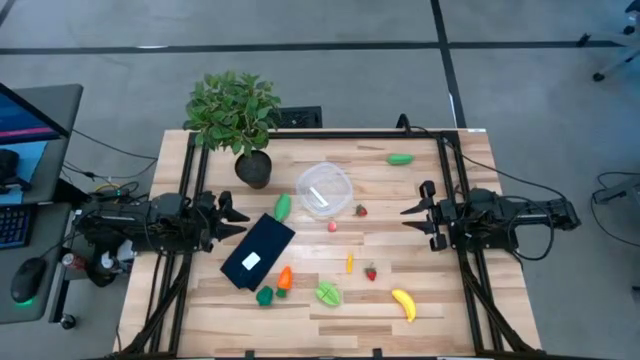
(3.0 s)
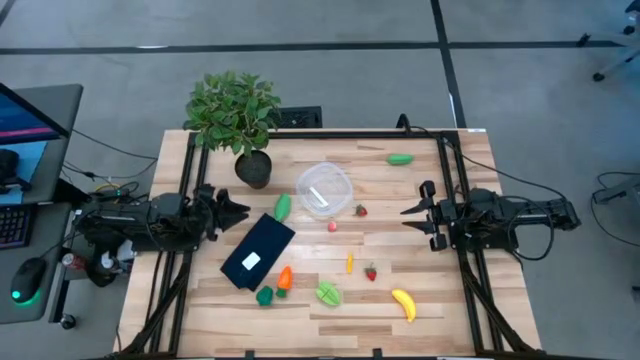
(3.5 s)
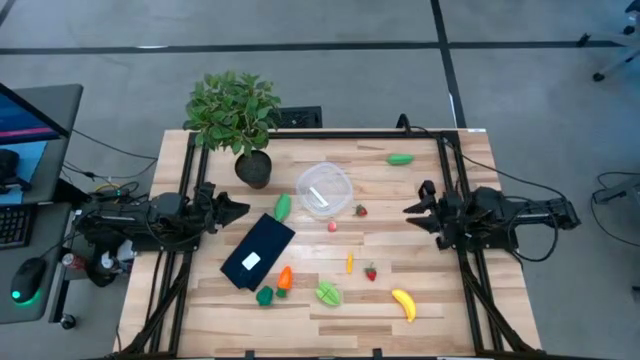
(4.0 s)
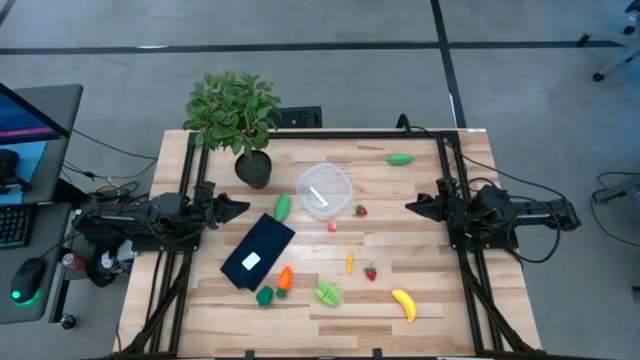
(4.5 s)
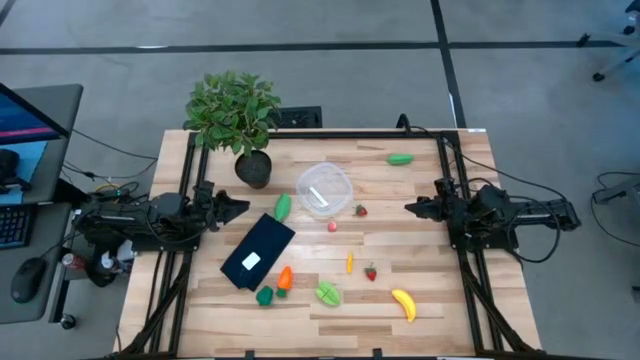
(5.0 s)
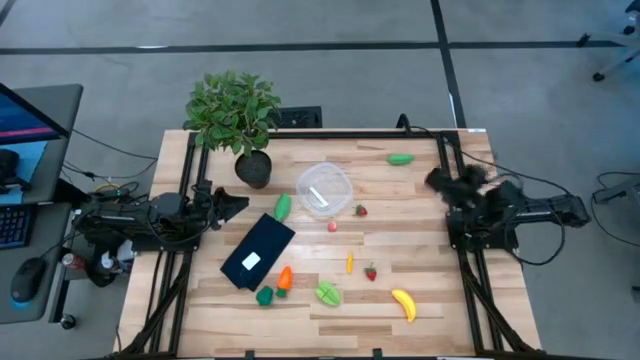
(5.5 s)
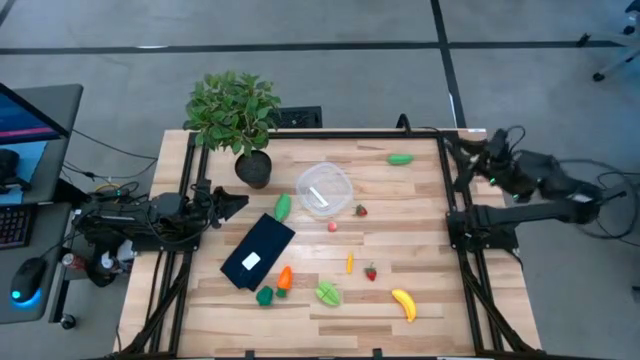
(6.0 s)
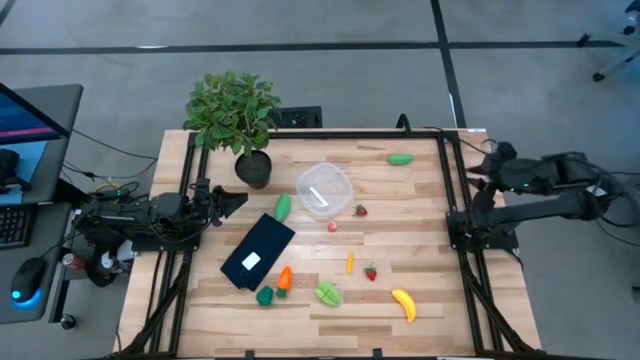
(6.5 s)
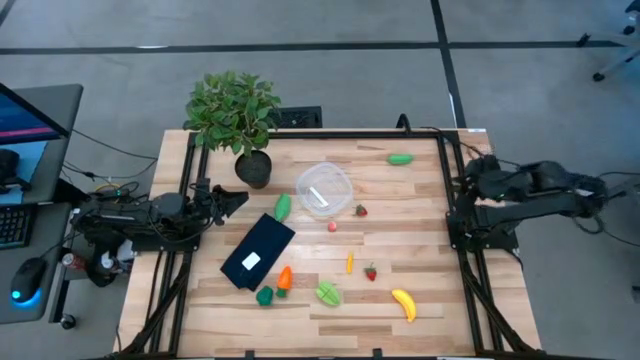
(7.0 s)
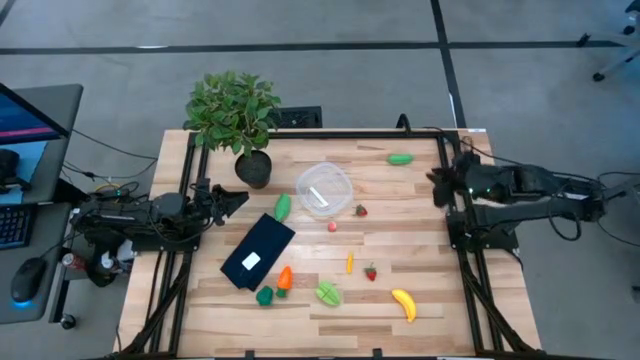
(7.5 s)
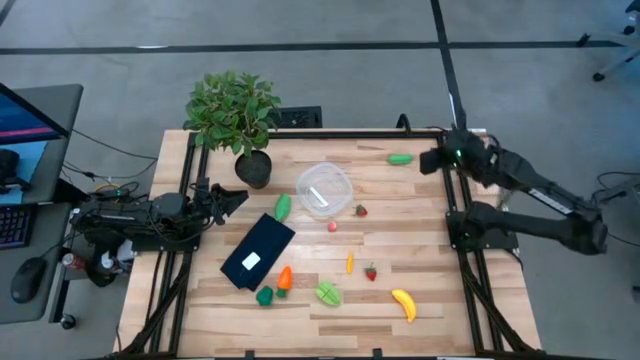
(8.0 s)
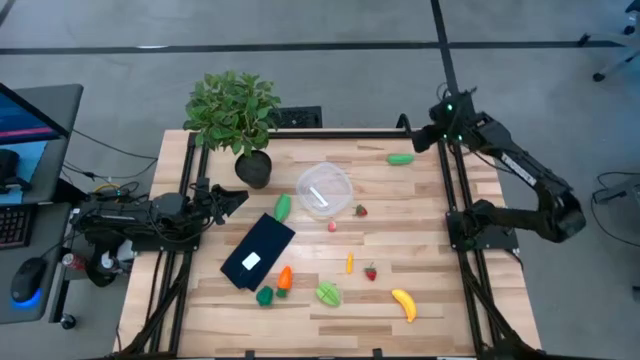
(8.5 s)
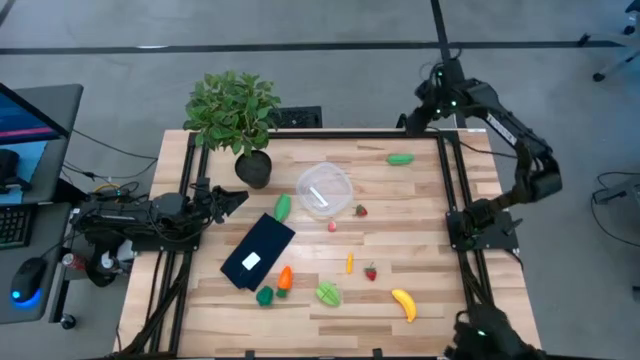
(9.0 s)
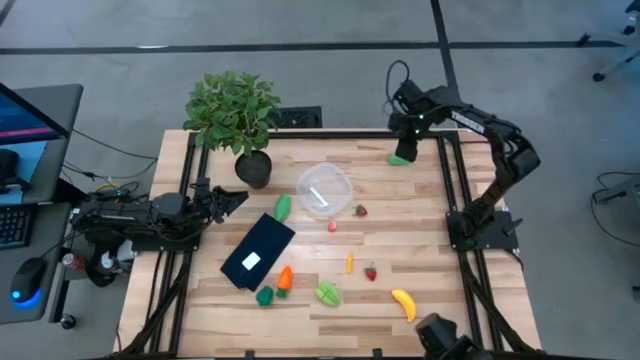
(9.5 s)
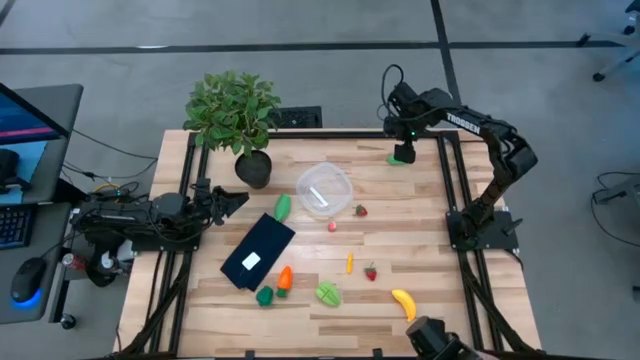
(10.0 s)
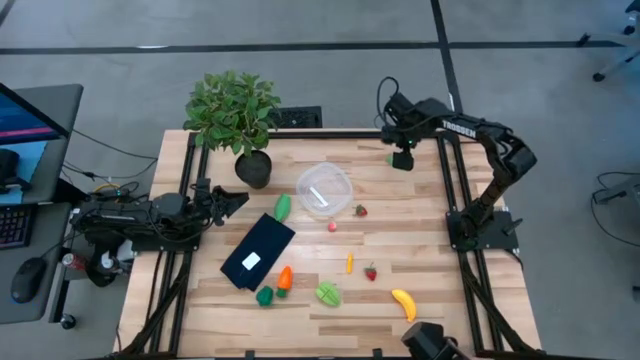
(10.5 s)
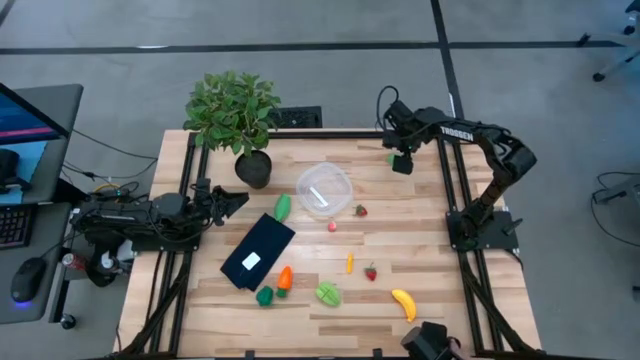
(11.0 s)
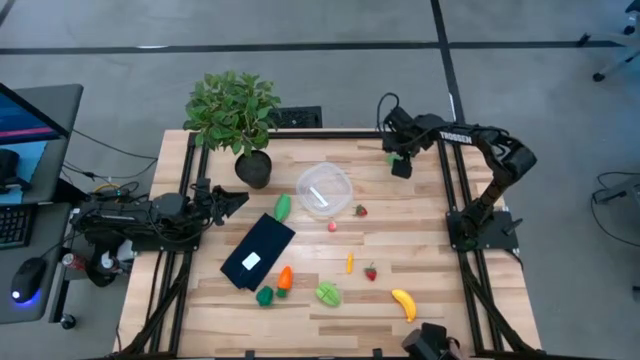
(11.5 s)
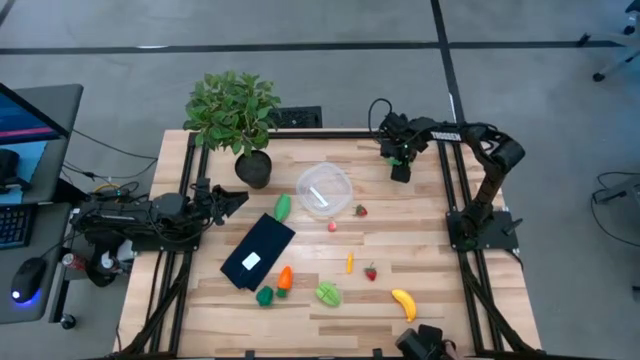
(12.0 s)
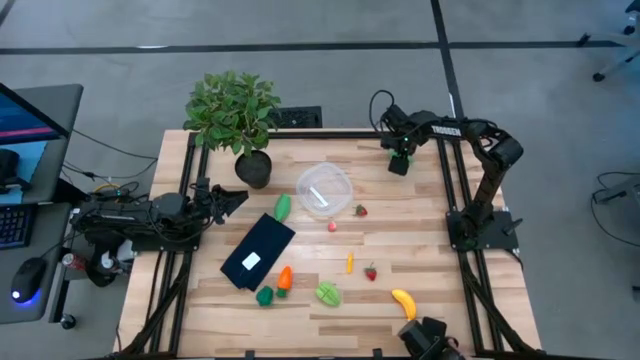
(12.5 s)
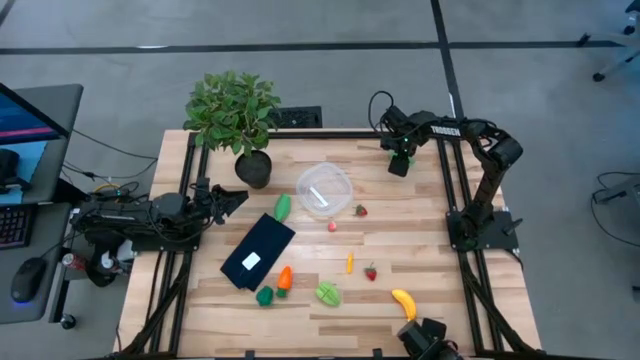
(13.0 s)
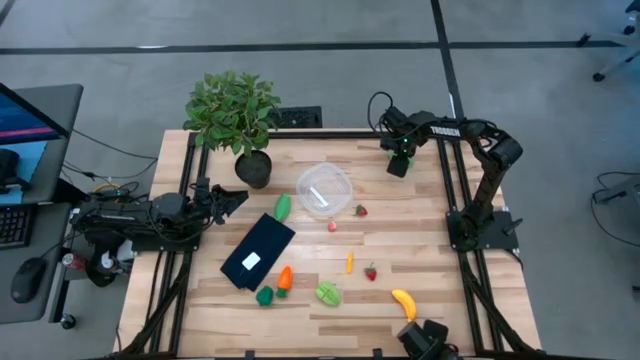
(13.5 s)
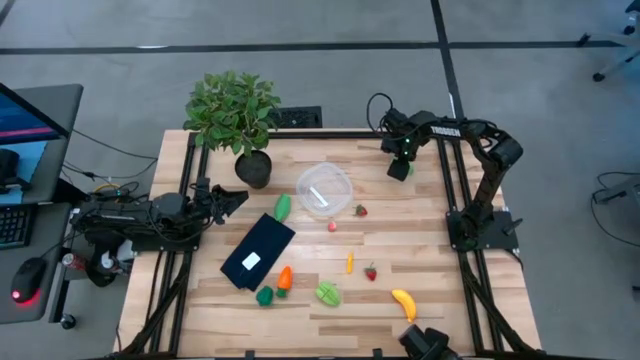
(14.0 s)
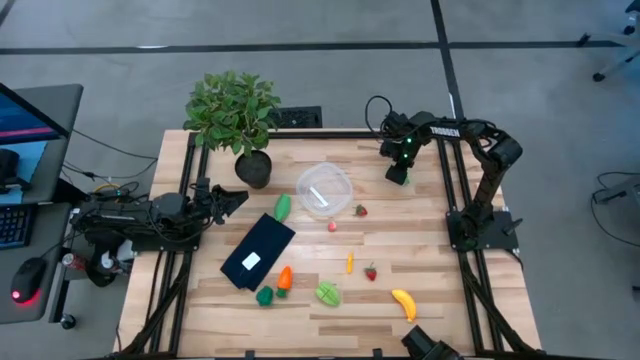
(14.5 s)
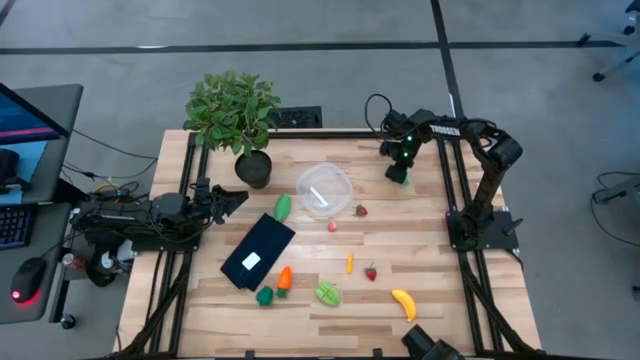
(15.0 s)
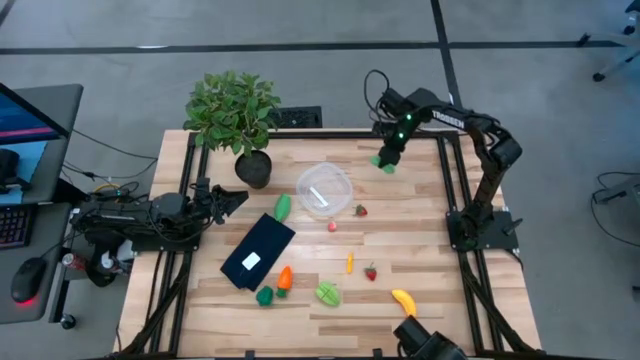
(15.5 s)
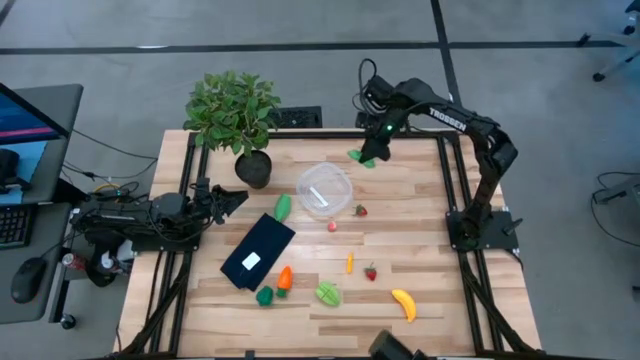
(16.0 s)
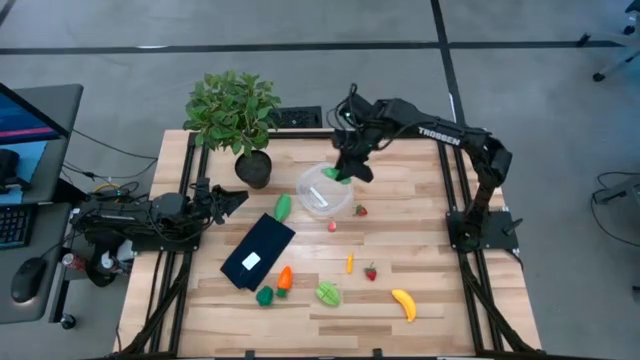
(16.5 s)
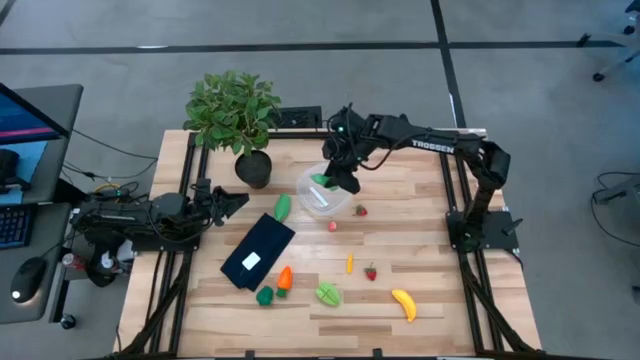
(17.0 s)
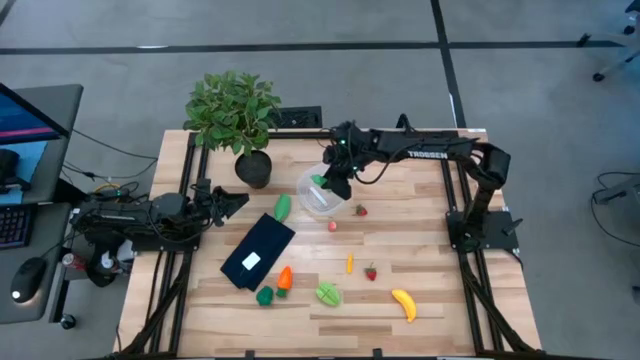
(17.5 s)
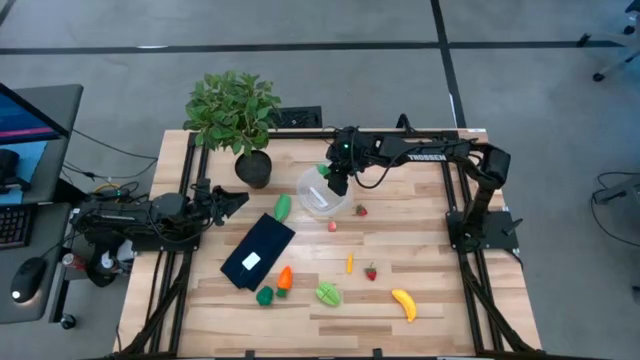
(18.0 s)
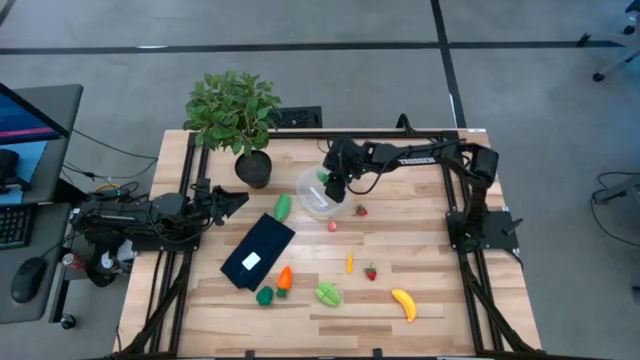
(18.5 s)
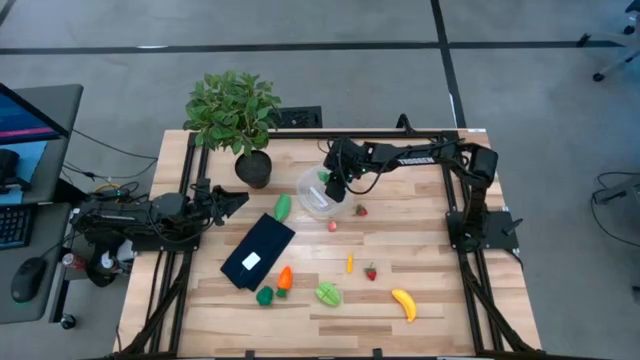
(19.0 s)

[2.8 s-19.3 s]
Task: Pick and placing Produce into tupperware
Put the green pea into the transparent bin

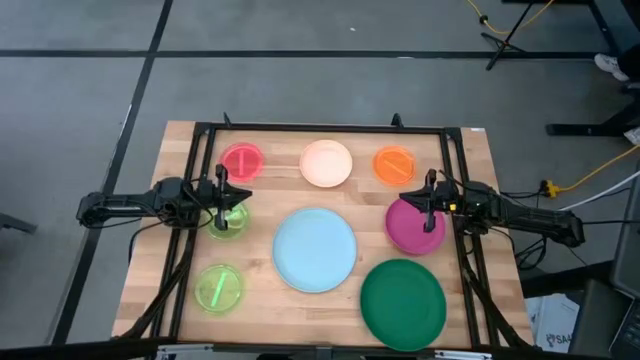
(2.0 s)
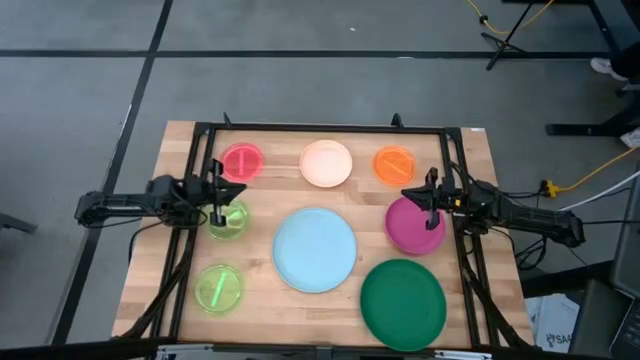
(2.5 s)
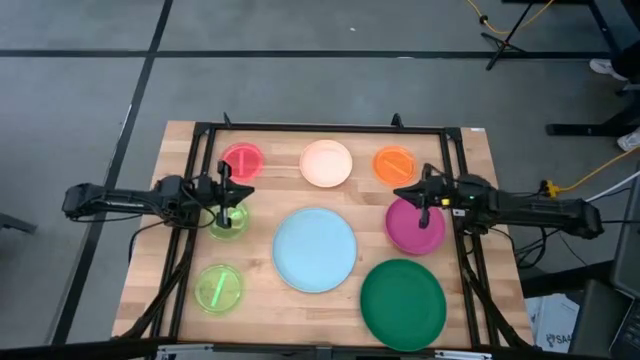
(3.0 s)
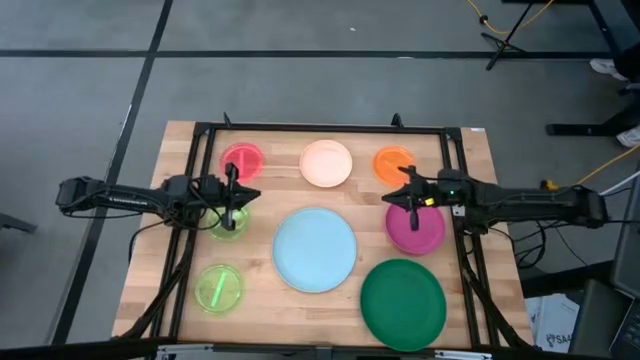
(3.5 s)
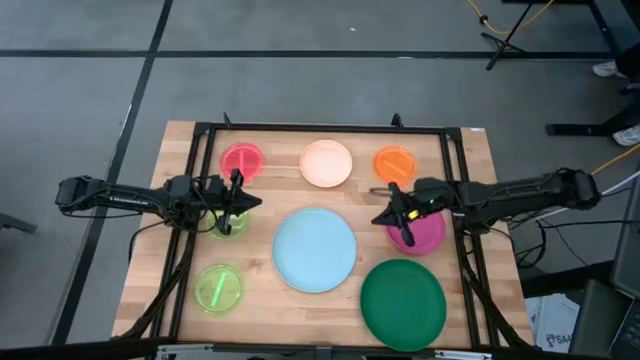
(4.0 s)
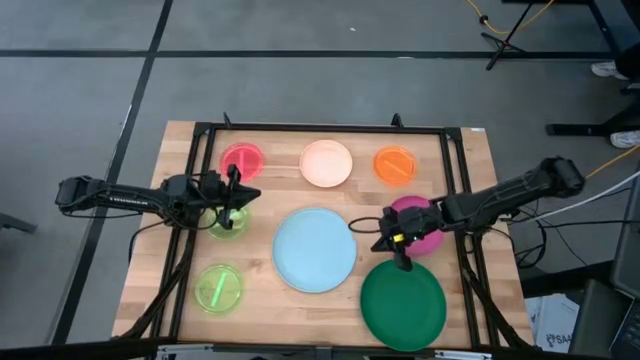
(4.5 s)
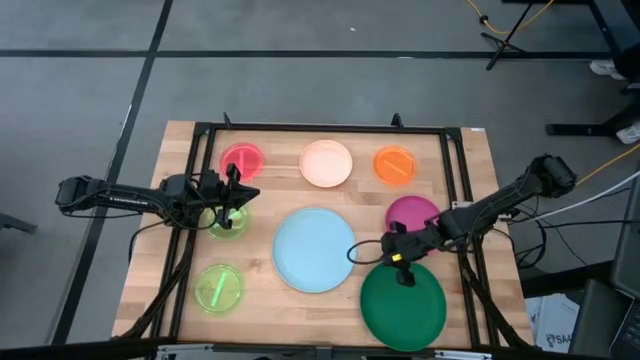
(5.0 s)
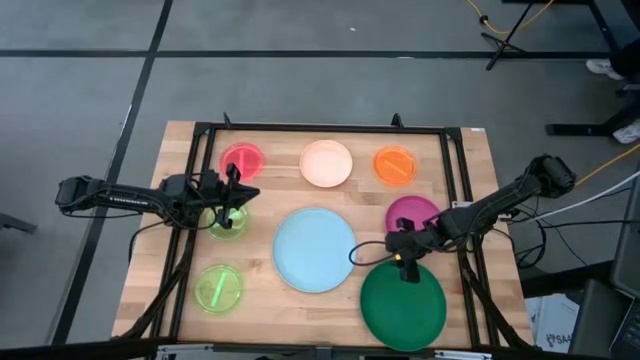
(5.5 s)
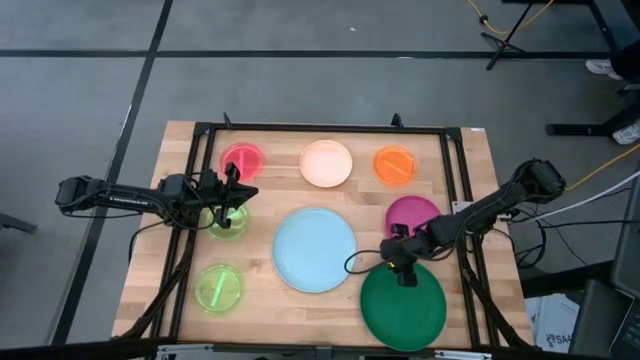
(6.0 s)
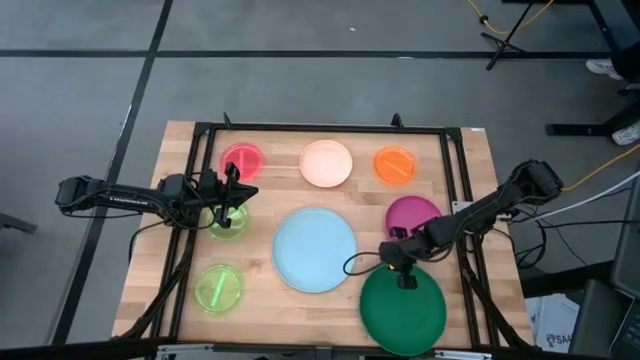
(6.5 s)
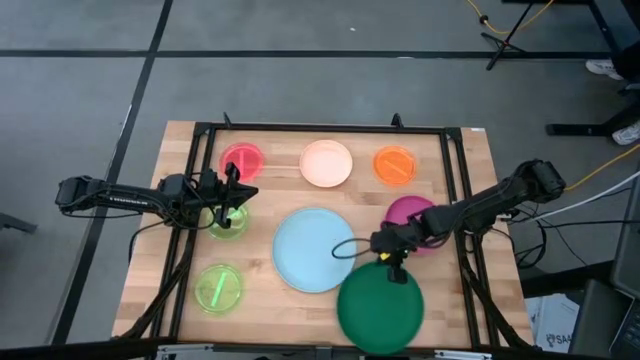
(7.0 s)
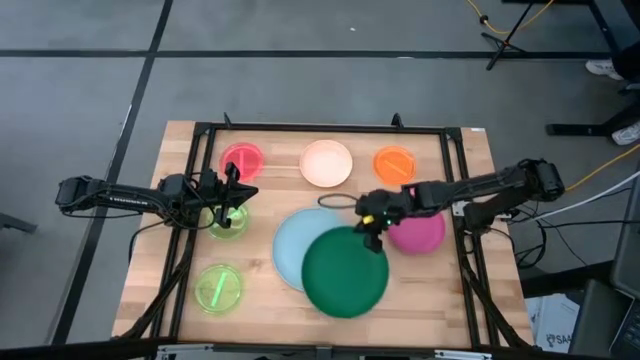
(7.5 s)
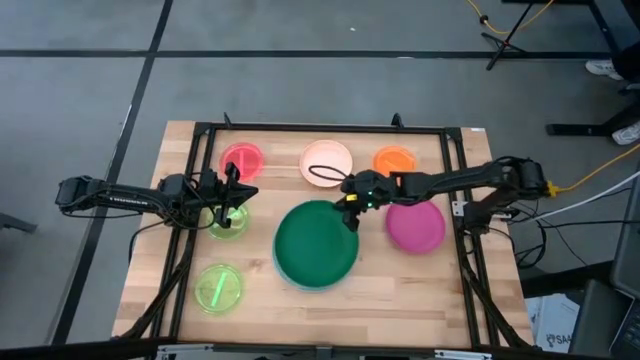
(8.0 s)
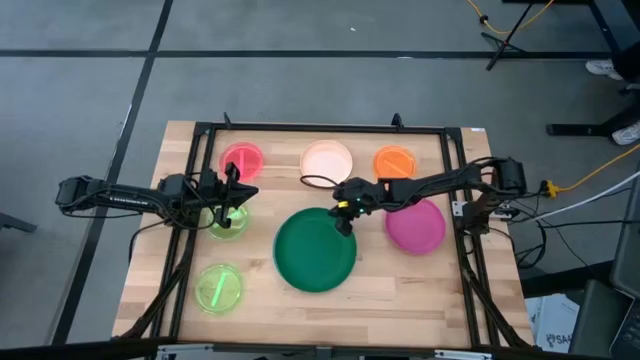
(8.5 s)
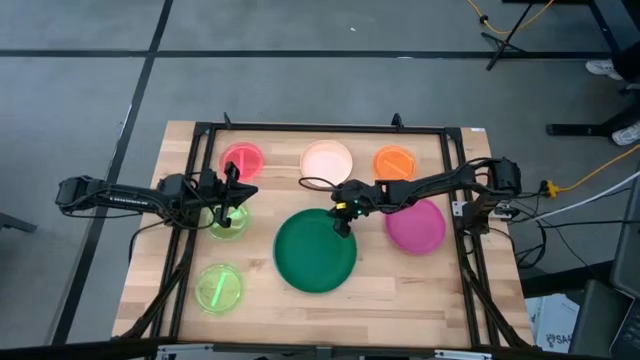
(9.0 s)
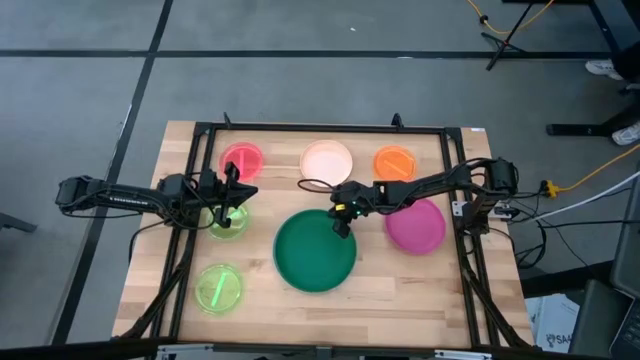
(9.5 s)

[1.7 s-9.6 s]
Task: Stack plastic plates
Stack the dark green plate on the blue plate
